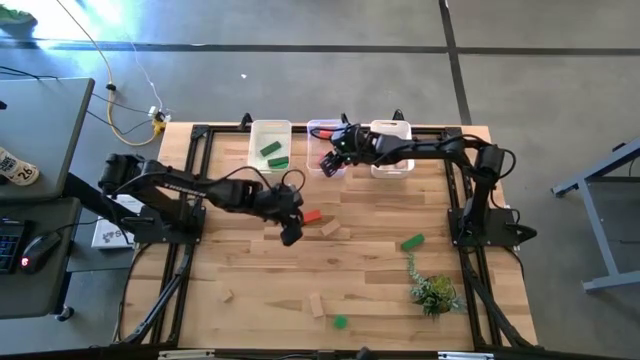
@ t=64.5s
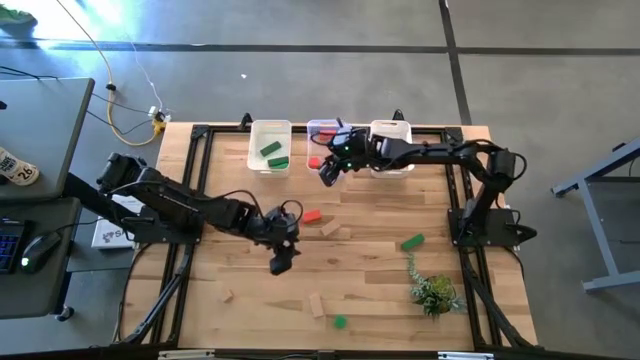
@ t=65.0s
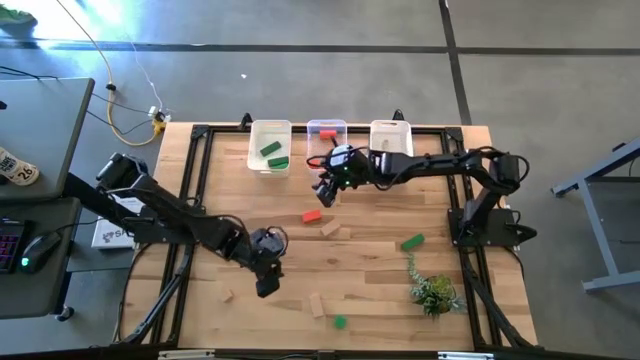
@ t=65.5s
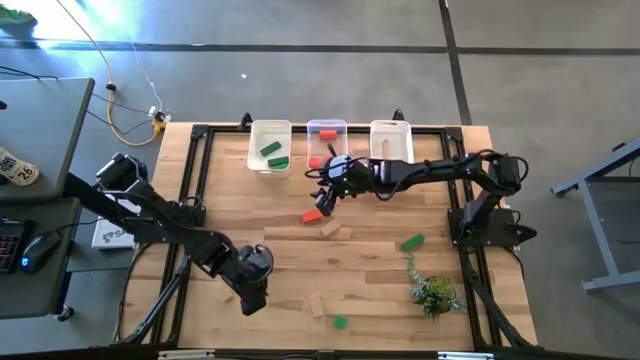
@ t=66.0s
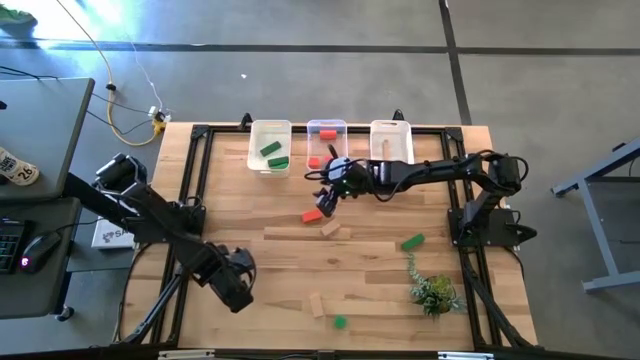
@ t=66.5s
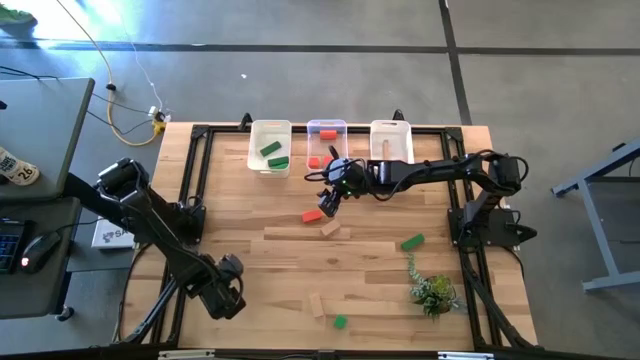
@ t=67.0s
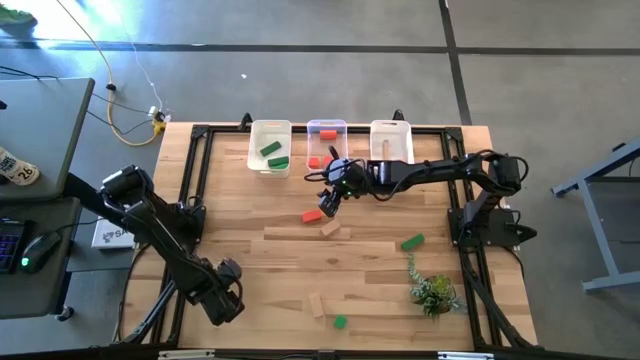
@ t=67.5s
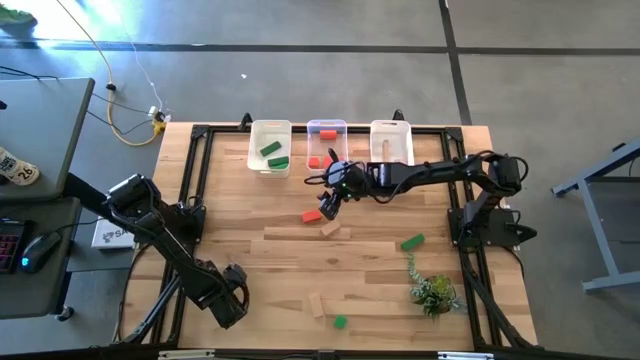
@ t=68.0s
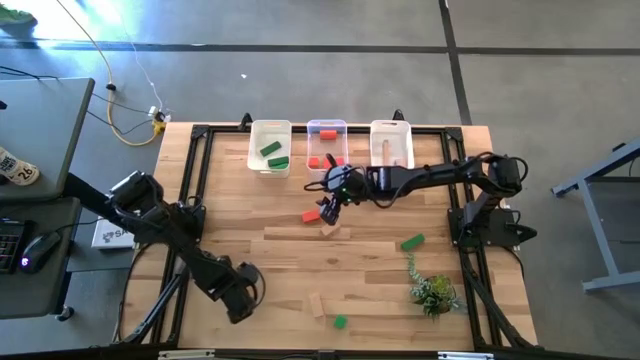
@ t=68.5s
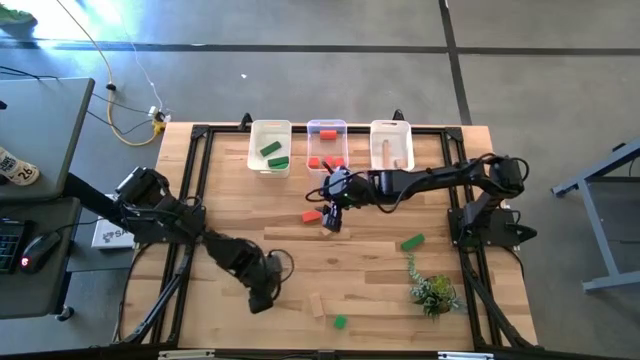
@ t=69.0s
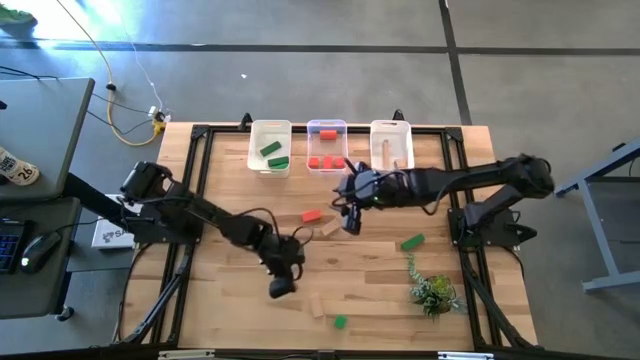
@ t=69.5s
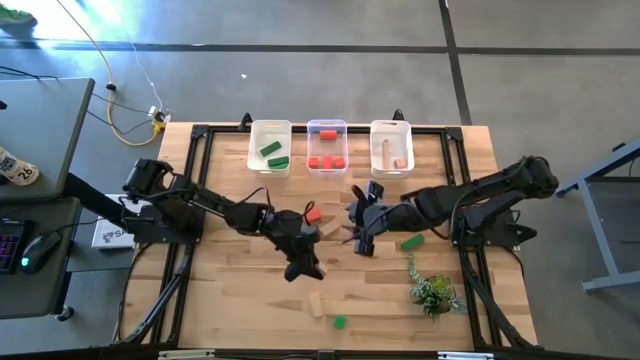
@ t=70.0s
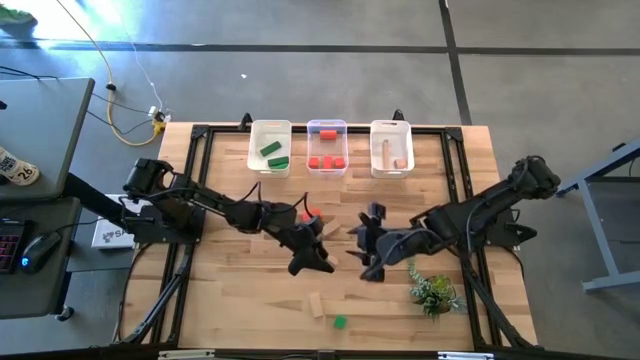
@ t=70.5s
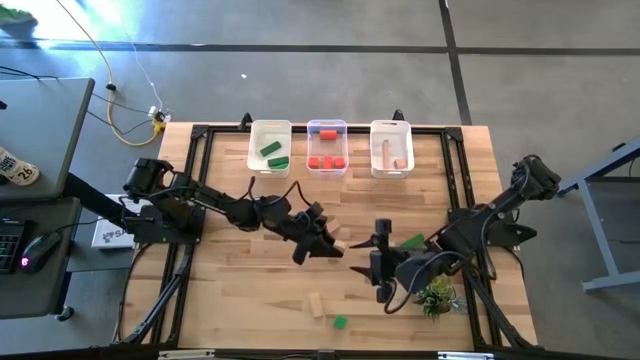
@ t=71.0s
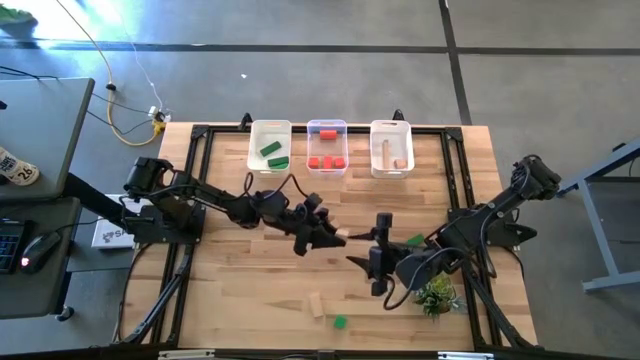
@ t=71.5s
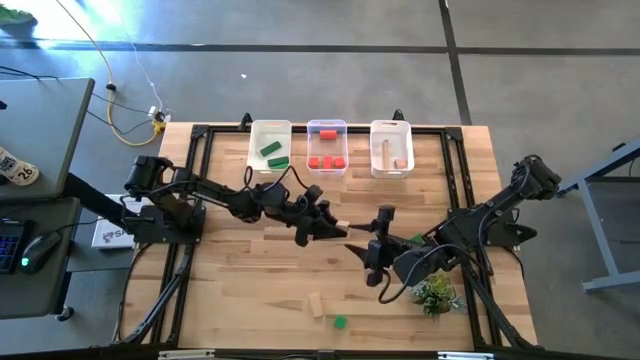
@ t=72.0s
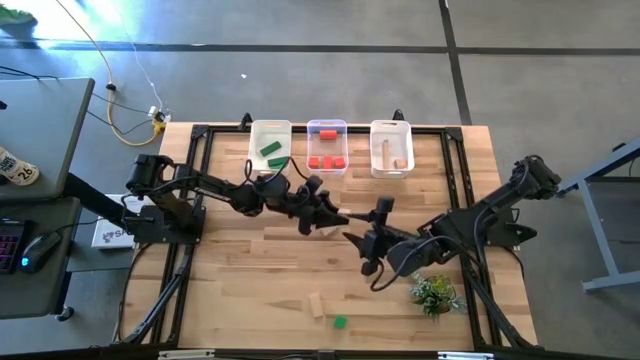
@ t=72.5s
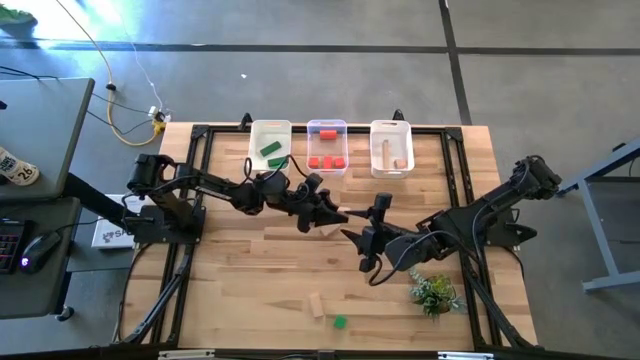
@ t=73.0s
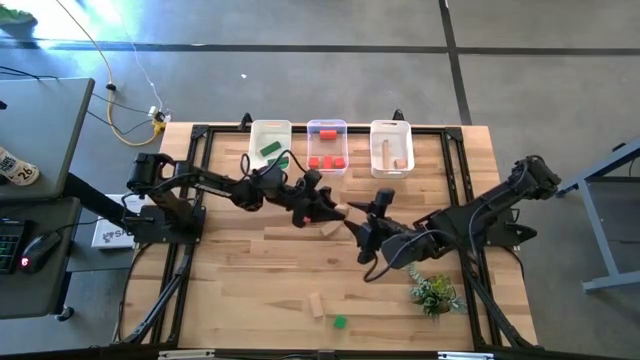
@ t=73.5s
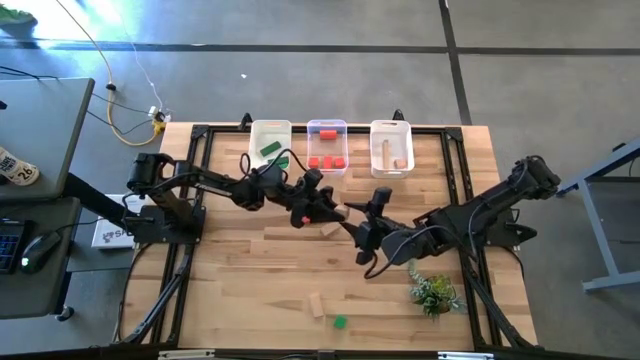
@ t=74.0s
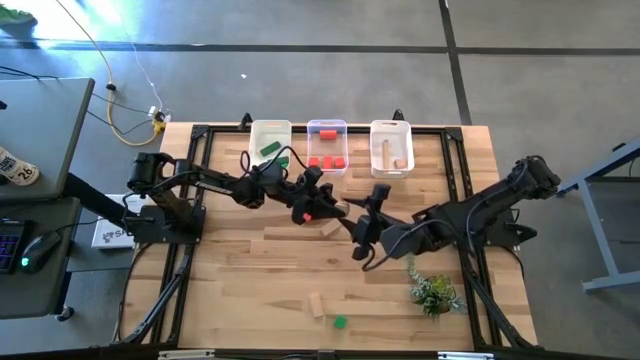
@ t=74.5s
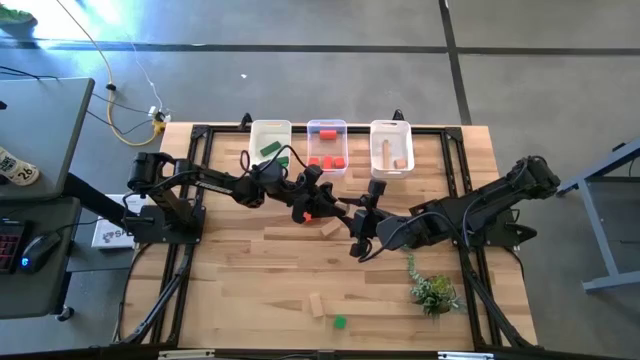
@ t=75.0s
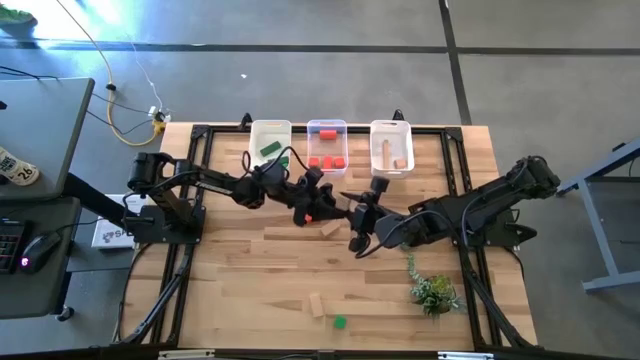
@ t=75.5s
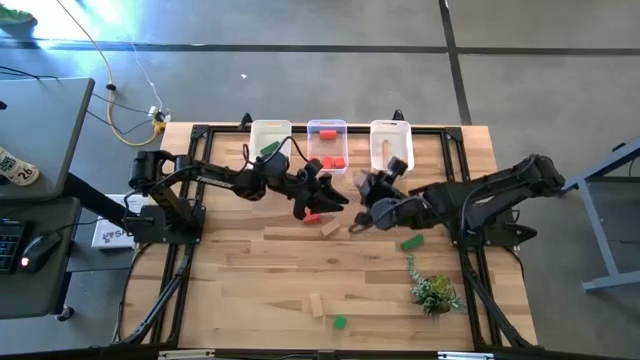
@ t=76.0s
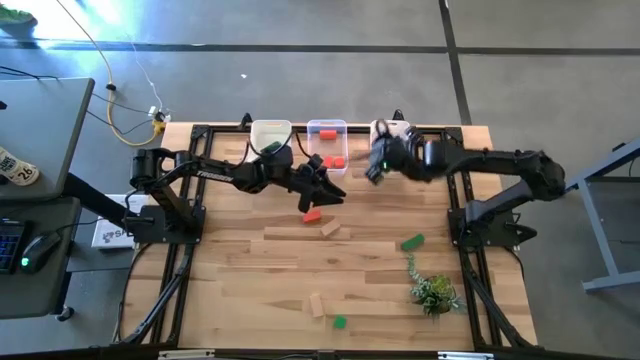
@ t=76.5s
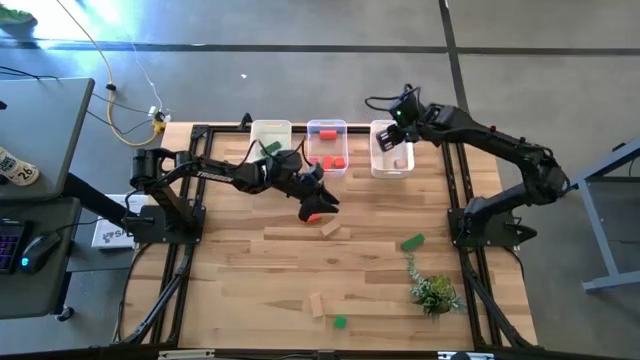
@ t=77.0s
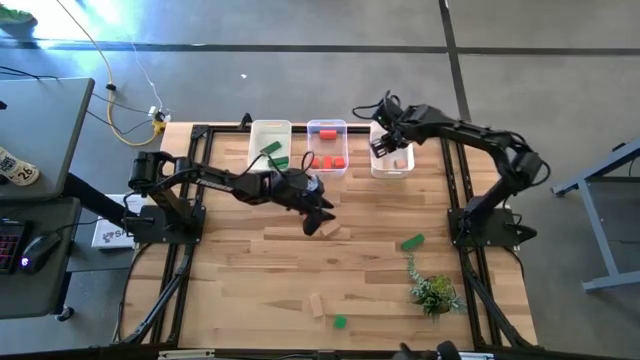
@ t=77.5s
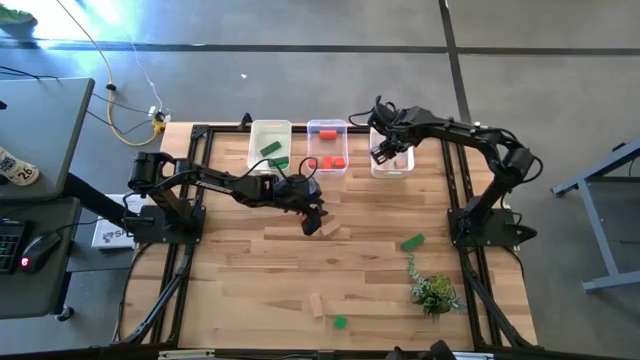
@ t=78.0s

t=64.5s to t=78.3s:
Task: Sort & place blocks by color
Put the brown block into the right white bin

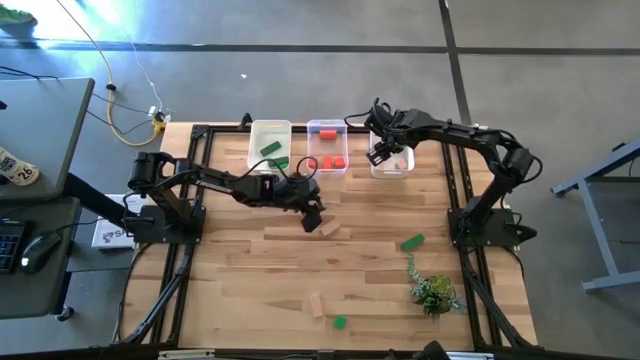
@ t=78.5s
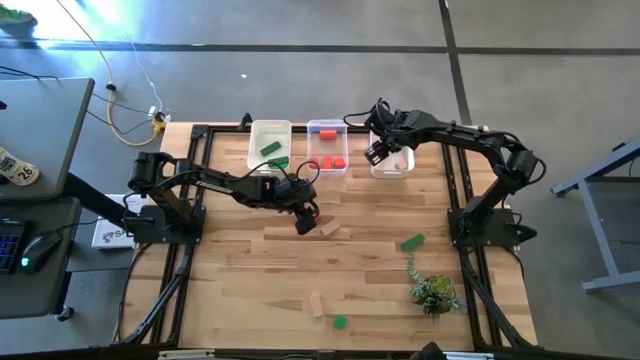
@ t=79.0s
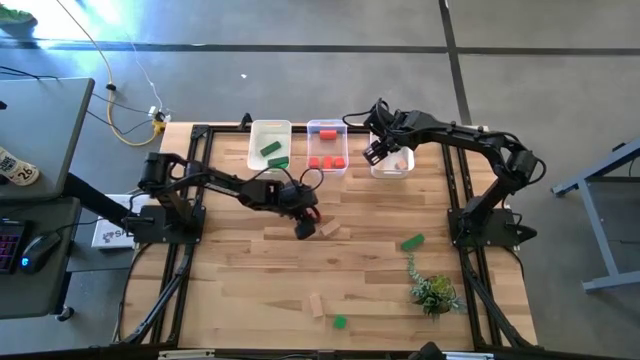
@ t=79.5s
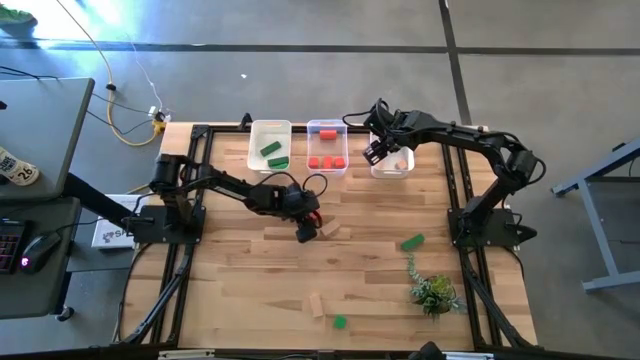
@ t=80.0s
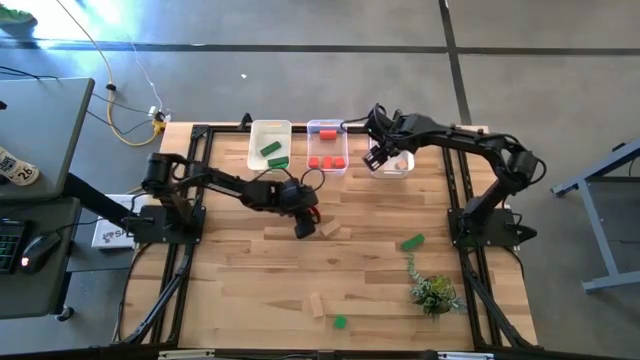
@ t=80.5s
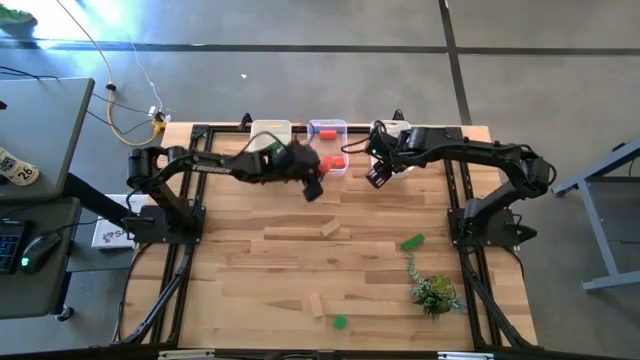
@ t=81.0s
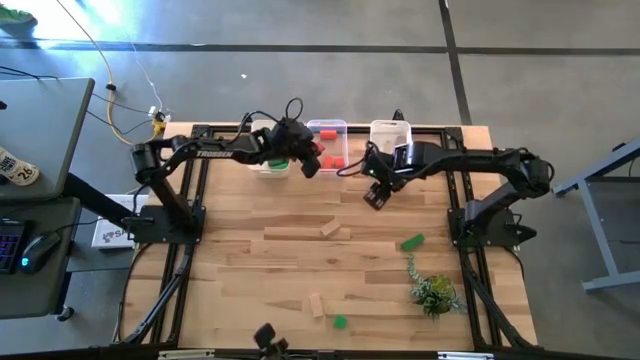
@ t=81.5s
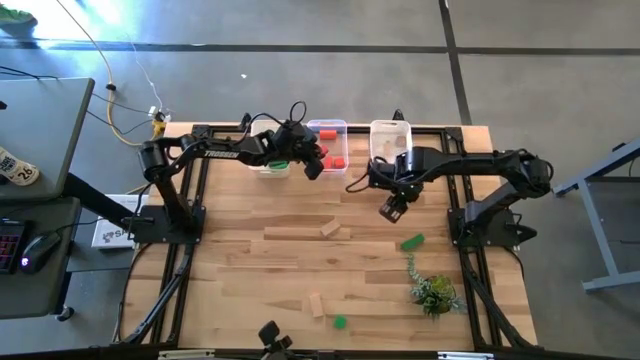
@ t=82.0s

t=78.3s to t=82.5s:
Put the orange block into the transparent bin

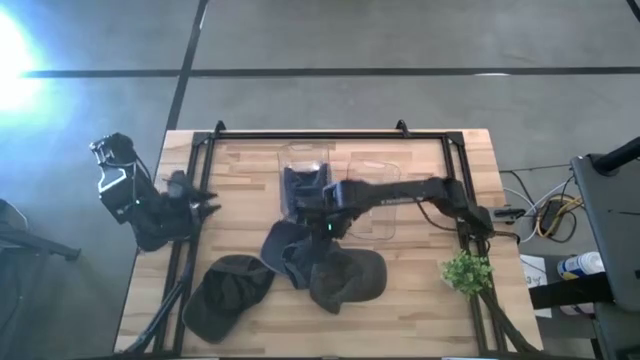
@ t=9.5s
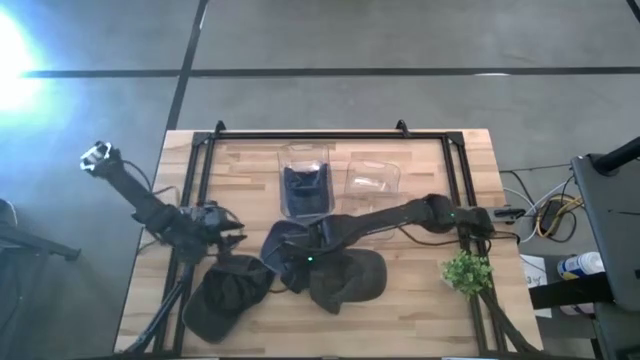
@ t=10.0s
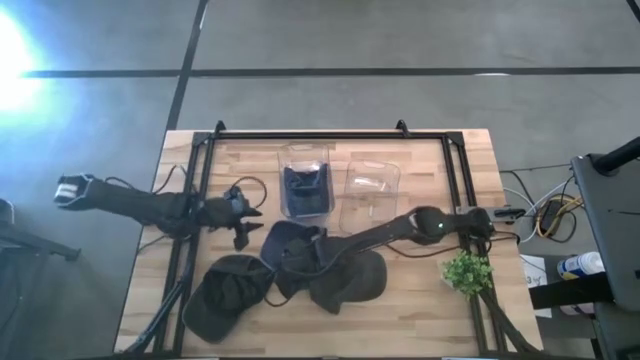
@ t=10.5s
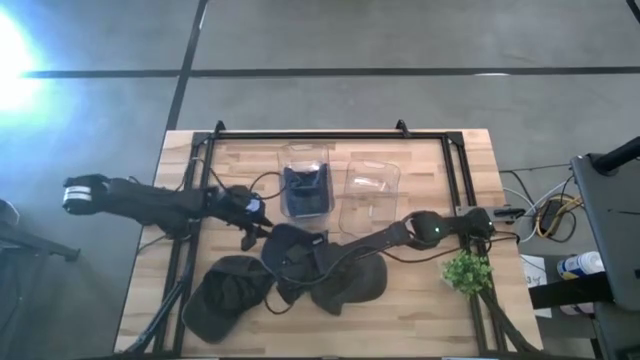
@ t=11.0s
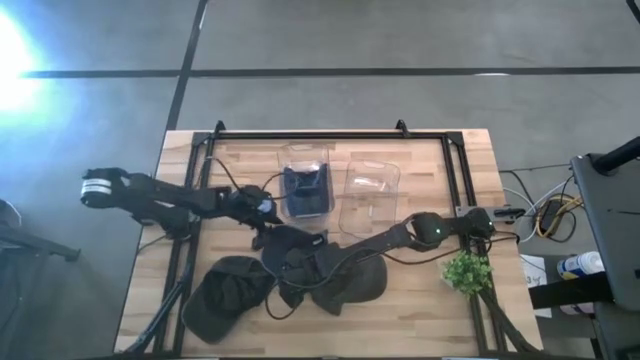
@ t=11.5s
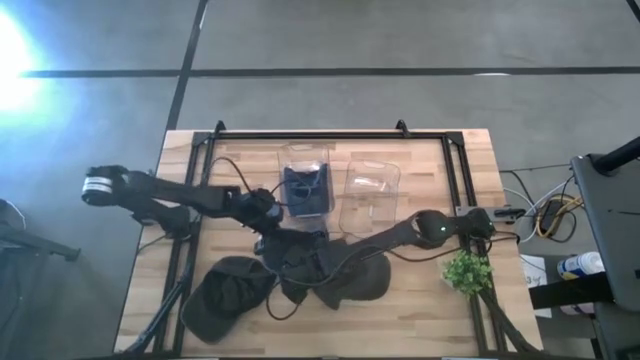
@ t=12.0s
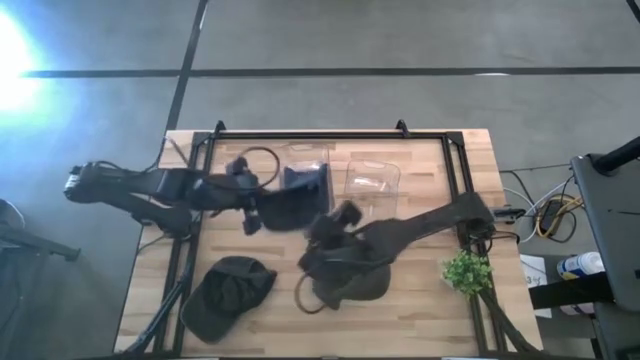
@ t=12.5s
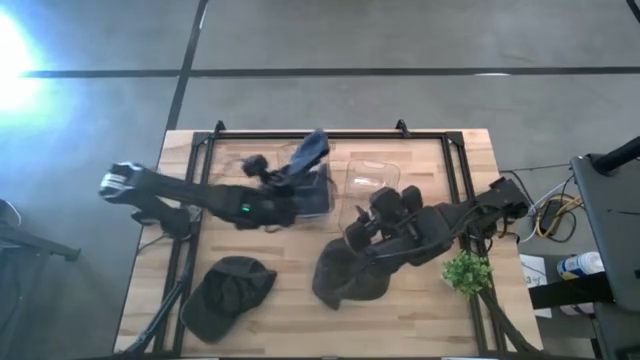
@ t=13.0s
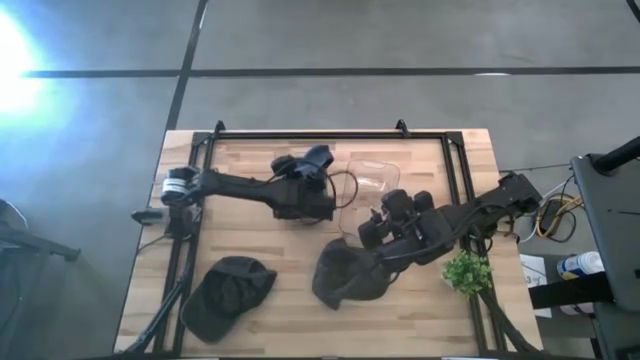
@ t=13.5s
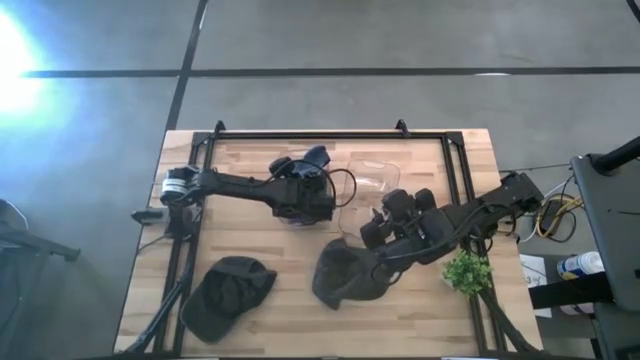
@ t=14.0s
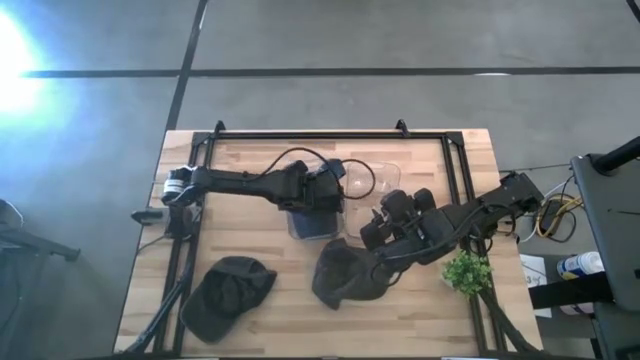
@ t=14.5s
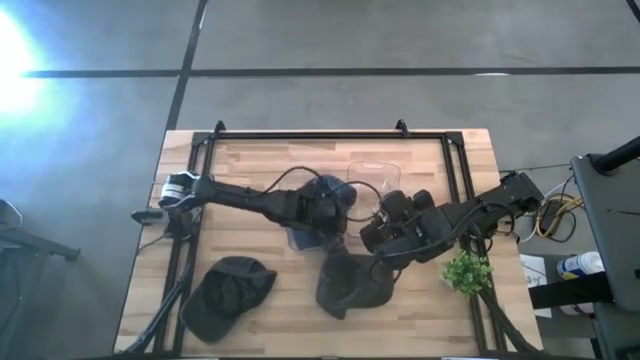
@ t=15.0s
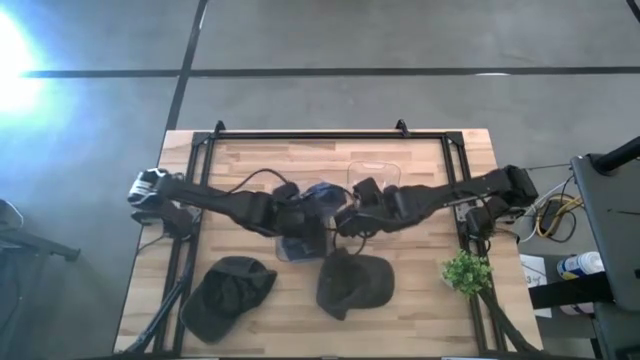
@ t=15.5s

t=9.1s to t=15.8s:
Task: Pick & Place hat
Put the blue cap into the left transparent bin
